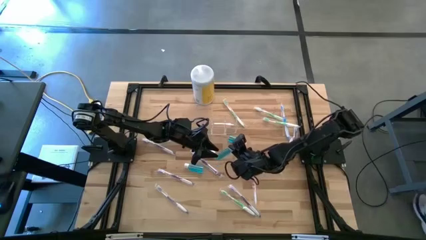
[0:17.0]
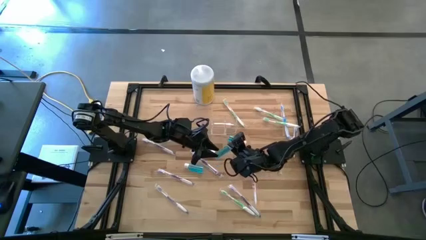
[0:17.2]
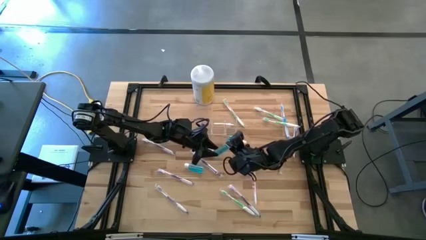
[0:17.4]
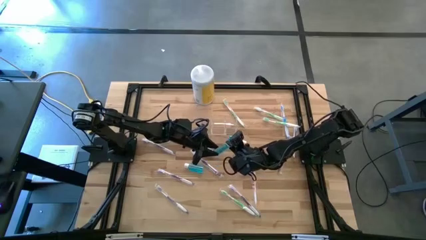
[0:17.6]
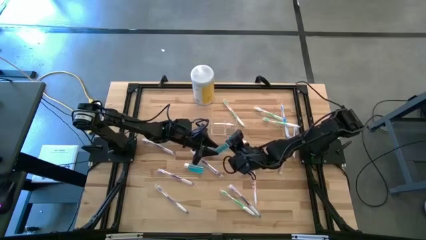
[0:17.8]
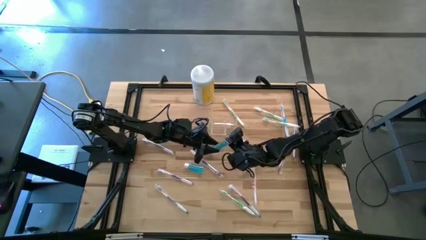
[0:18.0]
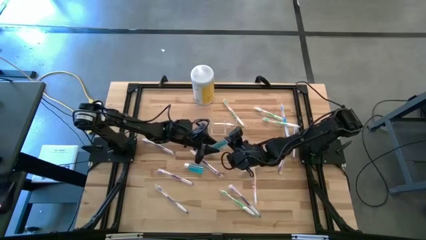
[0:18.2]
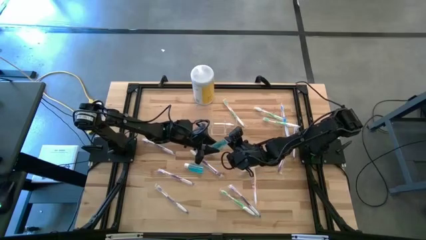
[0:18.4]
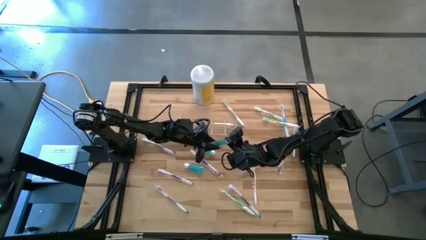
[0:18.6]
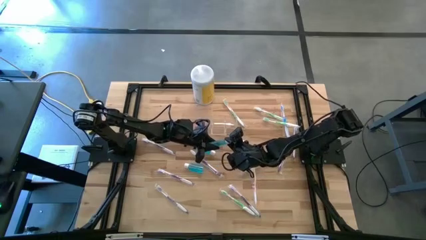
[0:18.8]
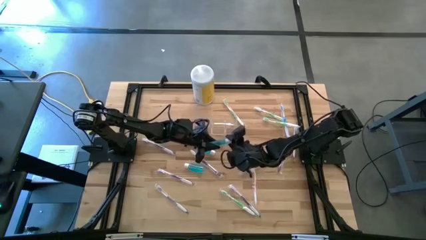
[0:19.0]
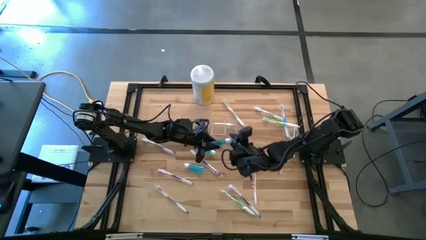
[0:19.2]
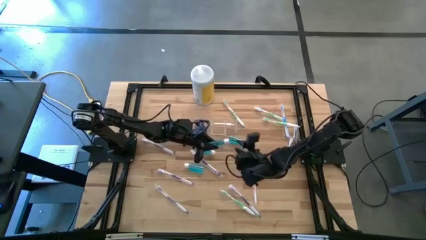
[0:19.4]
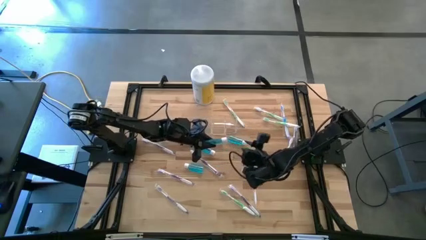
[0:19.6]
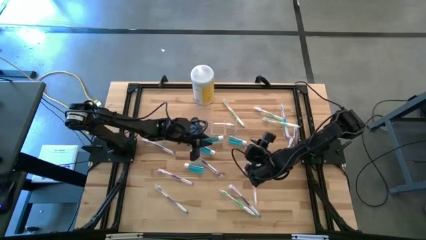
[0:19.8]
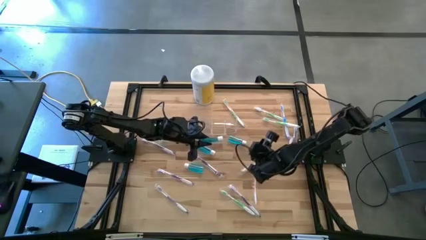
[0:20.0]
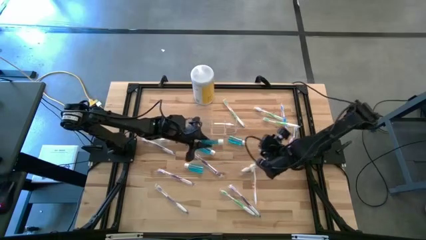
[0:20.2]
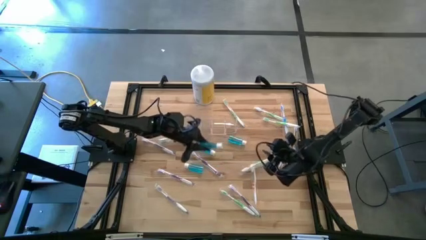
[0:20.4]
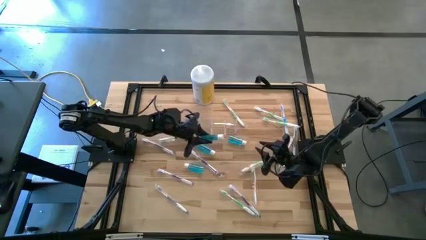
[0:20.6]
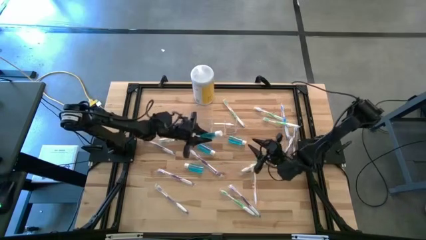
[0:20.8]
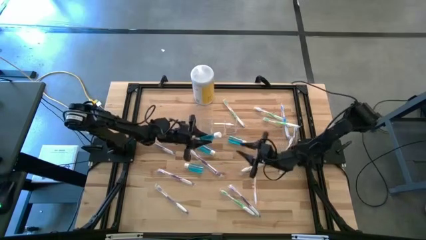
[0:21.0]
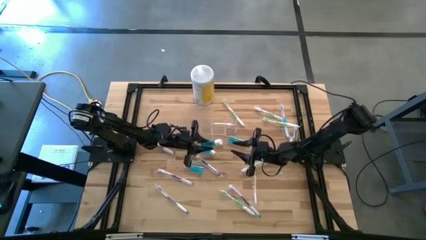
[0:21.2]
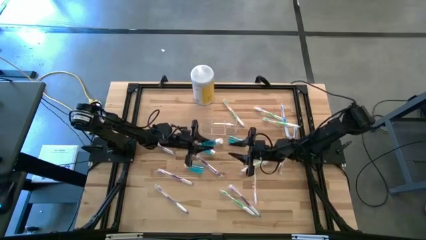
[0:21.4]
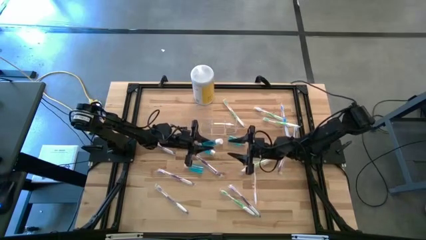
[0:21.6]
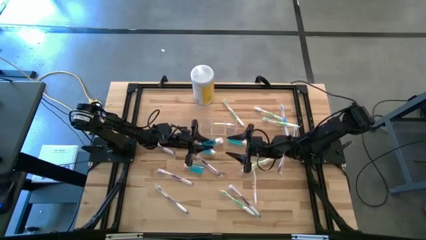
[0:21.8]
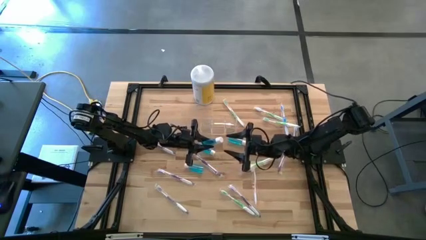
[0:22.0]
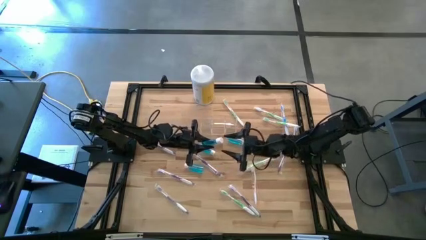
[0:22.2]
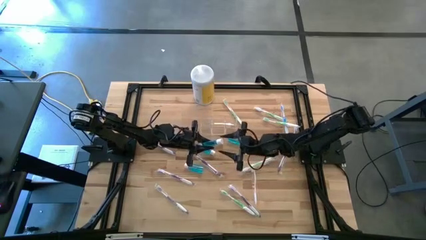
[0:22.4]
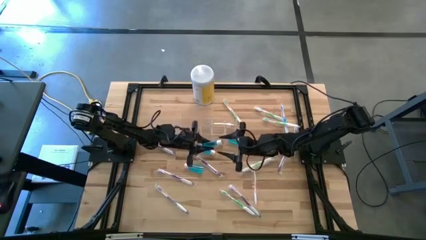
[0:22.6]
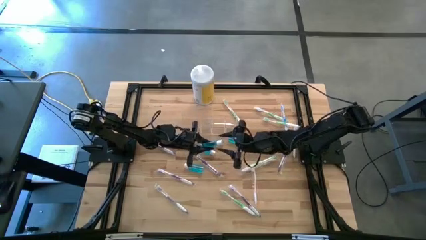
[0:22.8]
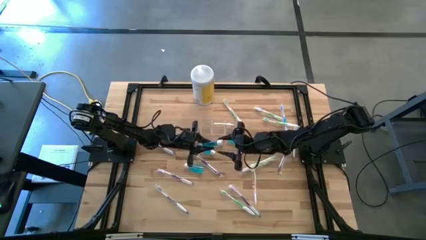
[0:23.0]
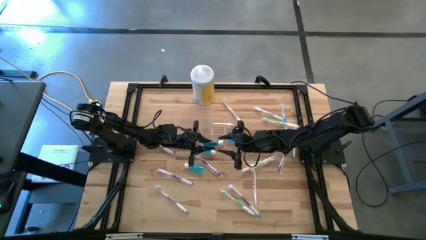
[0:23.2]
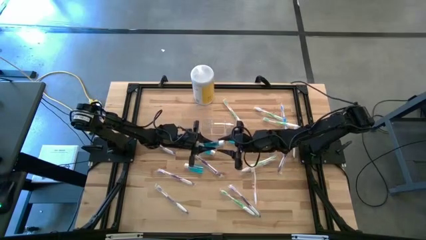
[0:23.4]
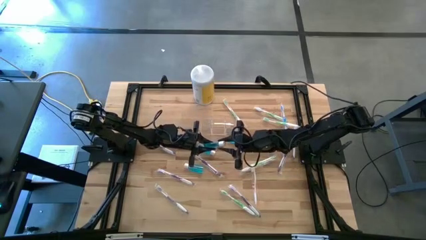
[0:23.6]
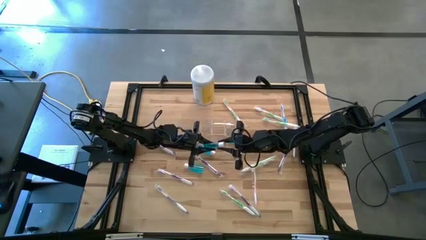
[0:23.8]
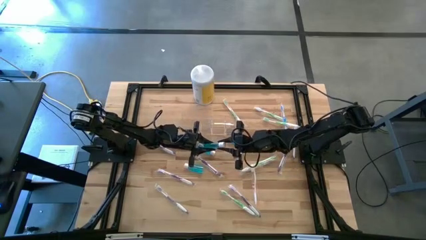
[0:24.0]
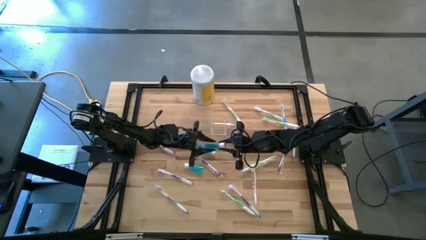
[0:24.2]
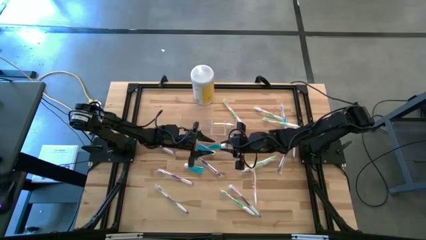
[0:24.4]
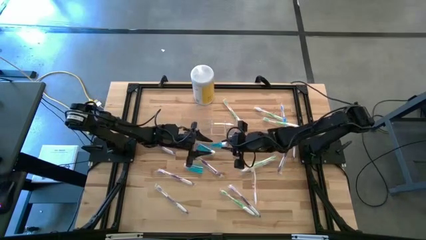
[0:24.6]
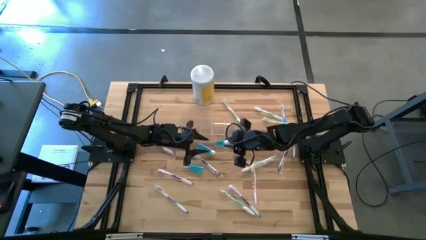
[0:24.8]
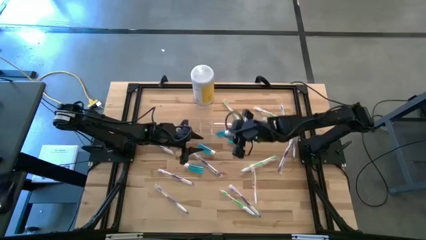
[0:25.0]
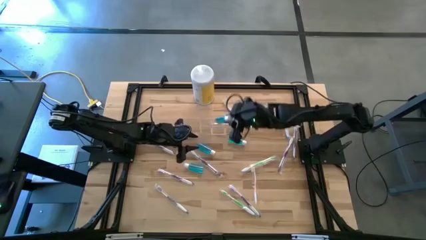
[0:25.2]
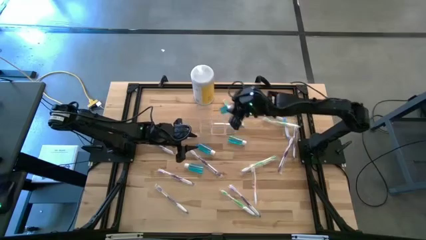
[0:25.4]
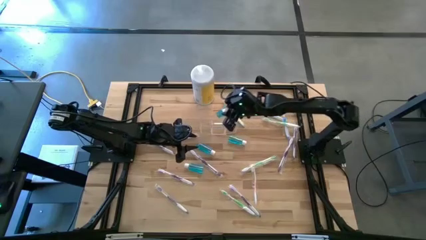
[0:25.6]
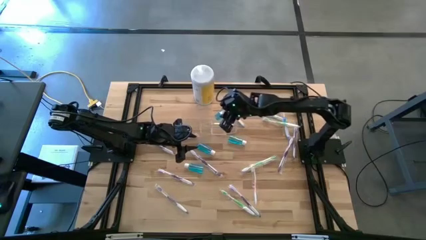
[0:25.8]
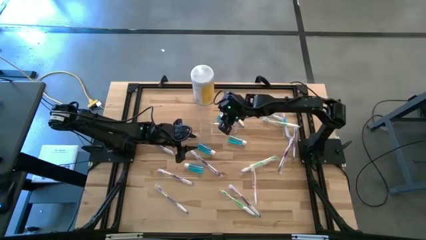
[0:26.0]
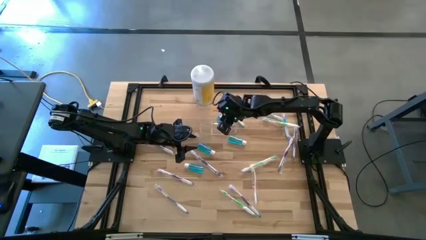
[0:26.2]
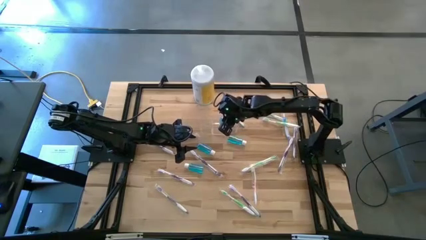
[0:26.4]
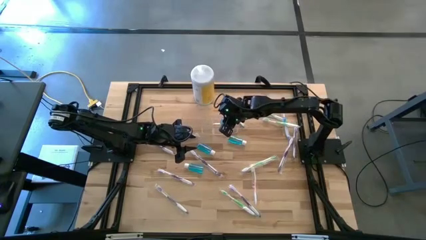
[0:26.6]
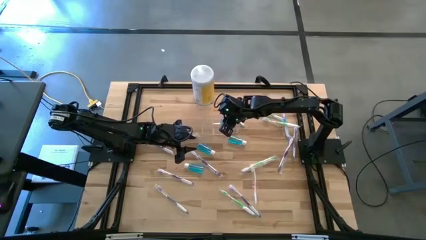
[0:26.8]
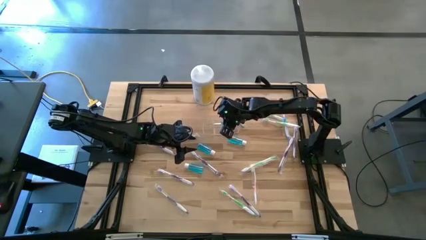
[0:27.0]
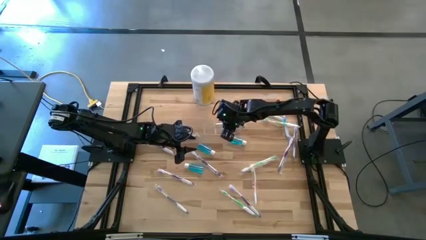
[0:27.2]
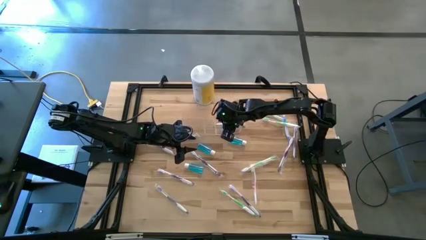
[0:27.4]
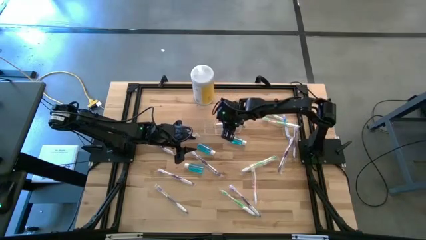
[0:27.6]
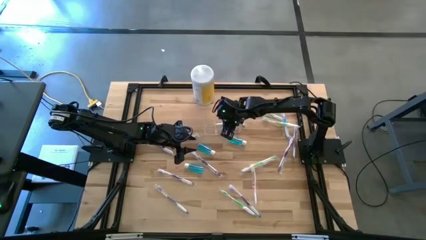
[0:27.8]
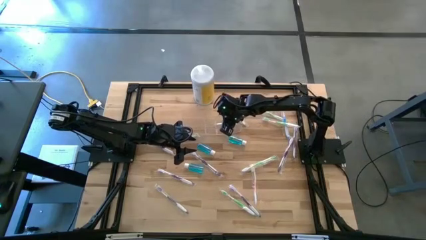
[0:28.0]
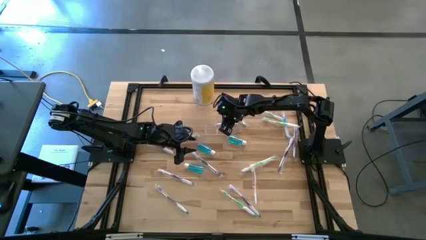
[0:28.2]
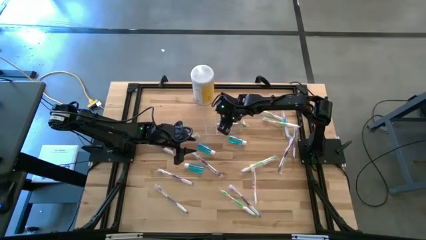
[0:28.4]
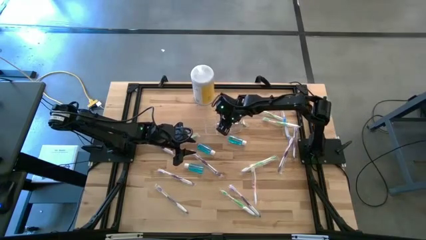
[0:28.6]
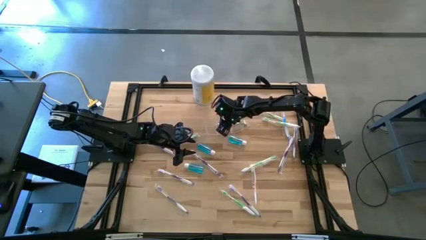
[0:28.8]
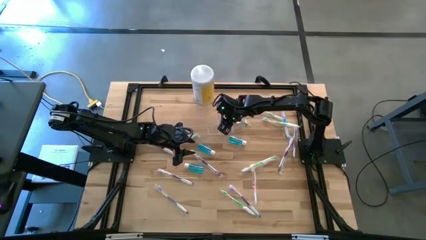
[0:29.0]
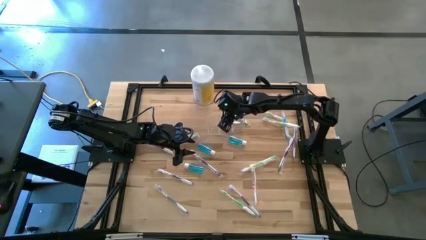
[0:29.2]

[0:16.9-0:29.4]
Task: Pick & Place toothbrushing station
Put the mouthwash into the transparent organizer
